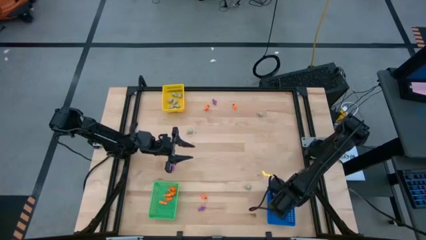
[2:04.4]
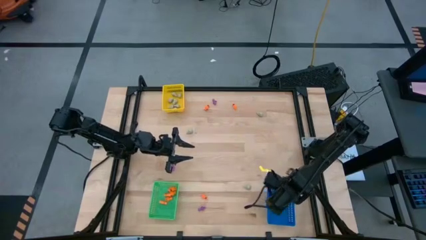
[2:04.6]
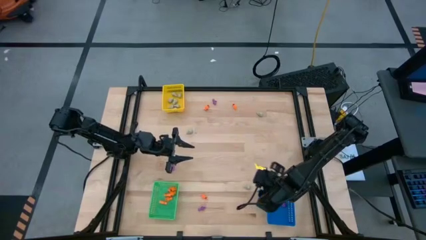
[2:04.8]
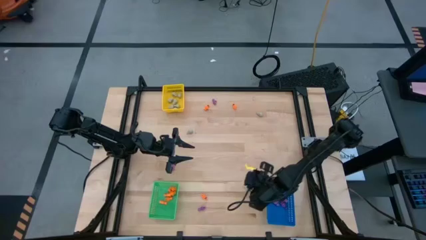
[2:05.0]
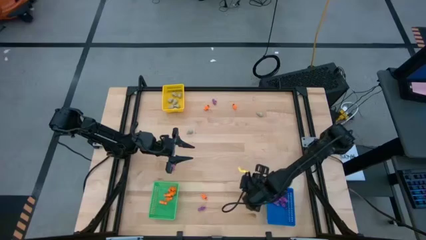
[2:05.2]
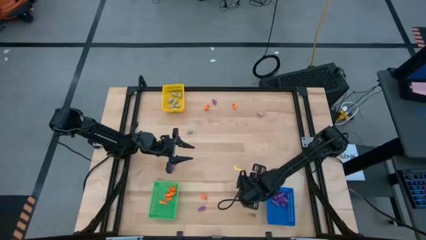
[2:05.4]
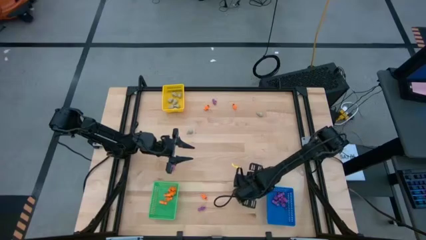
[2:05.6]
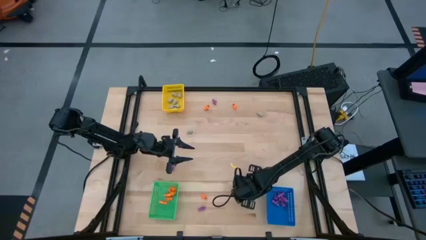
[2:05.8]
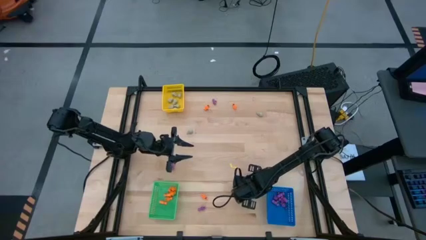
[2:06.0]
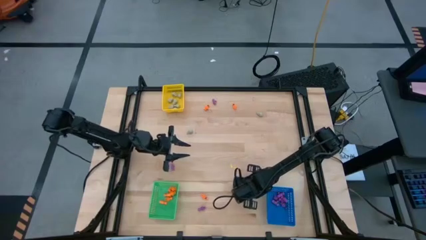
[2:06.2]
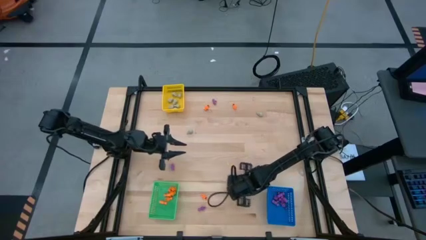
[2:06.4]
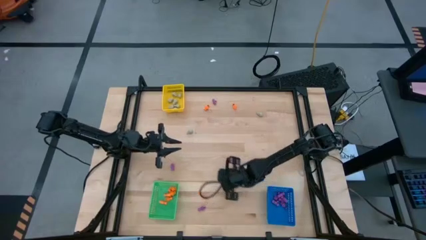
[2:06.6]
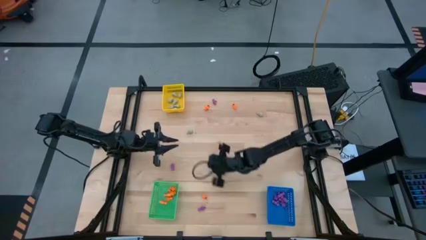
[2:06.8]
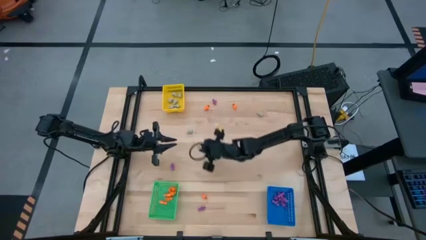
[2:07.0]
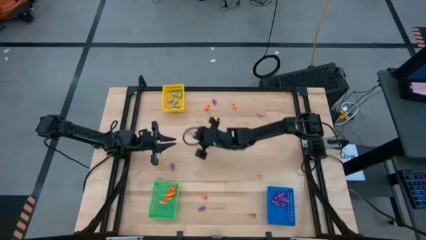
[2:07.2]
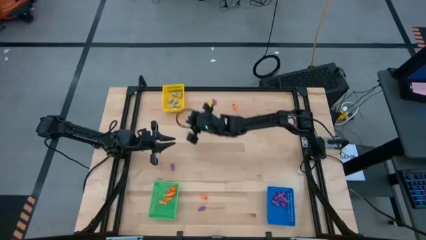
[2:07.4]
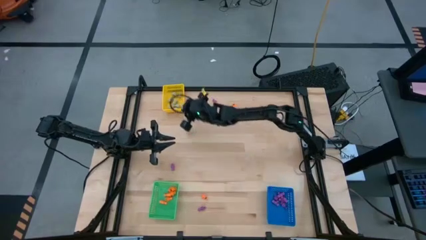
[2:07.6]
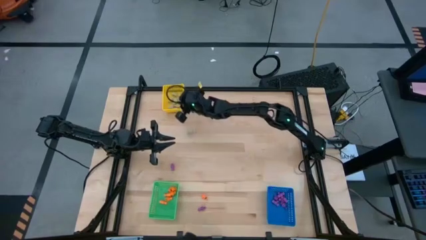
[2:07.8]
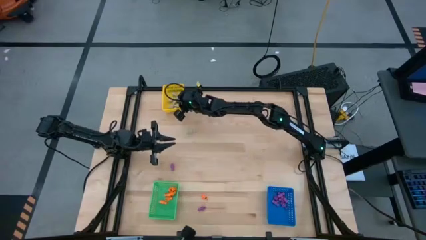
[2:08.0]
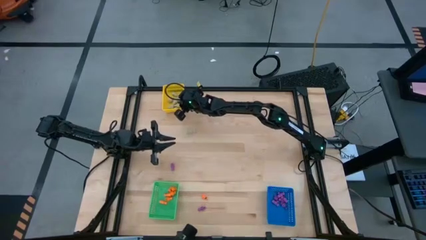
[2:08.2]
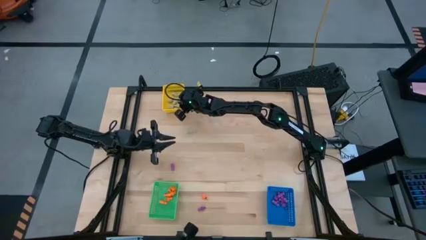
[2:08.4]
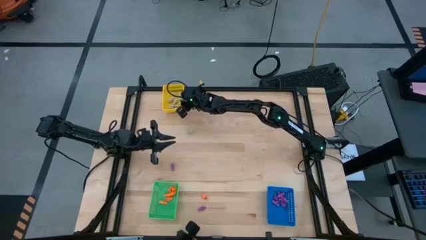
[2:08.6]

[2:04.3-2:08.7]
Task: Sort Halloween decoration
Put the gray skull toy into the yellow bin

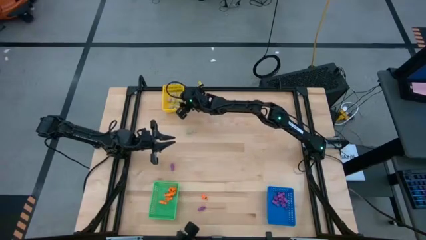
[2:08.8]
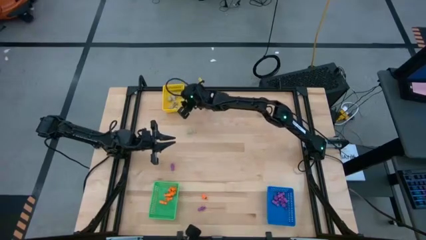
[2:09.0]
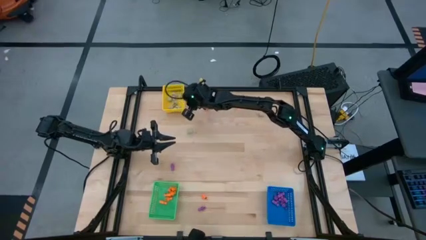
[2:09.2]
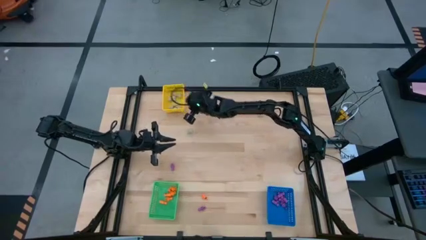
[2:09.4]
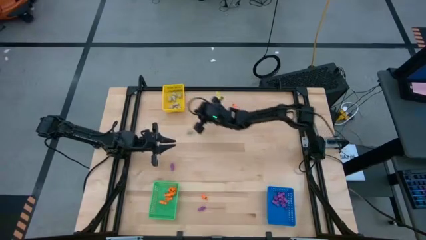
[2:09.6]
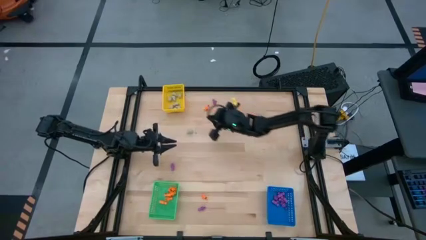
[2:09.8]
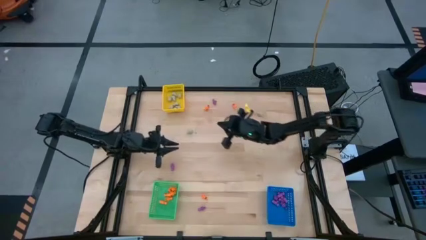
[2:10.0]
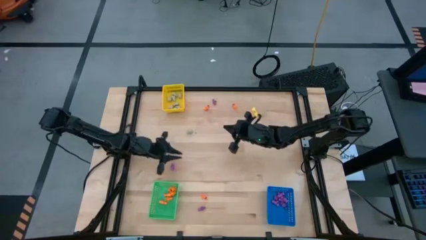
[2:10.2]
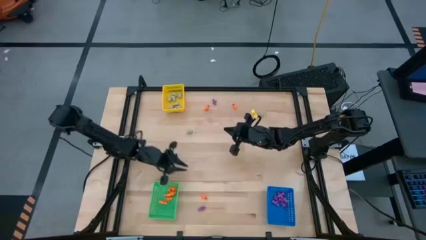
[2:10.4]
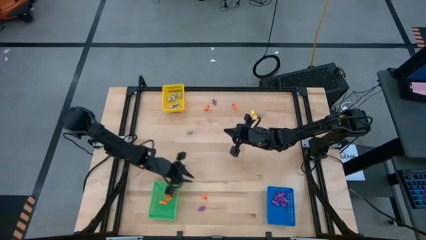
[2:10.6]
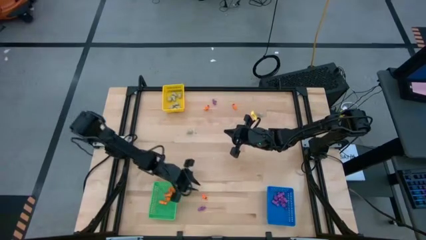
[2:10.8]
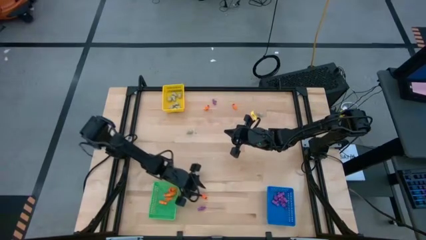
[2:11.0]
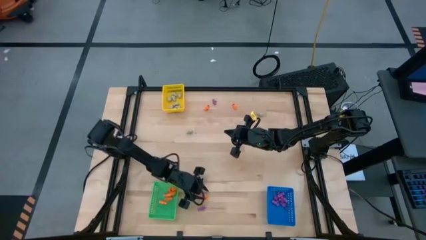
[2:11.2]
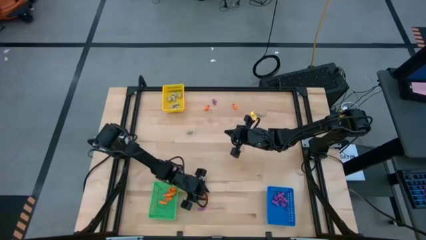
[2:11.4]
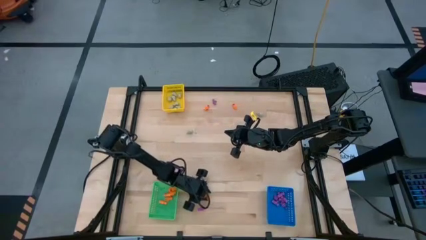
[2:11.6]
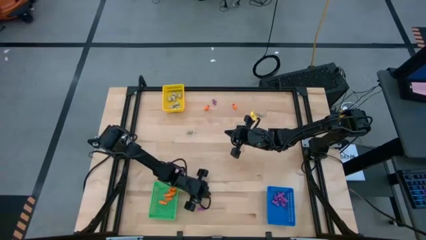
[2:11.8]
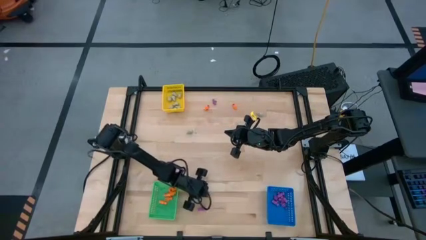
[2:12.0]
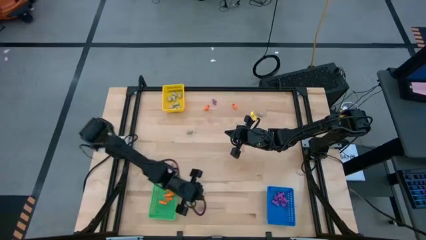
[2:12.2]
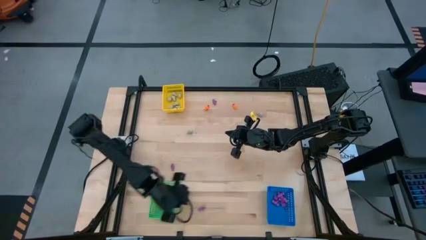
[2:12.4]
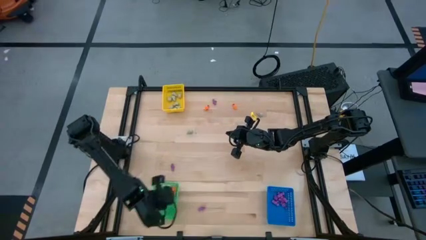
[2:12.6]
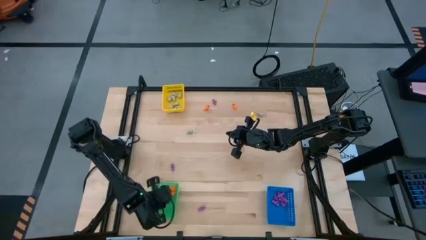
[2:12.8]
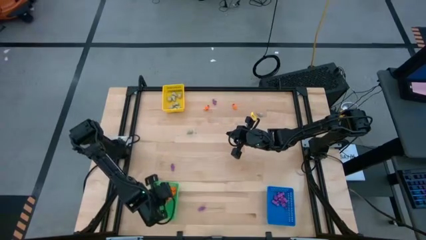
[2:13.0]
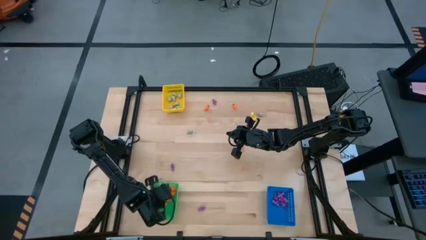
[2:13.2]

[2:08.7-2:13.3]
Put the orange skeleton toy into the green bin

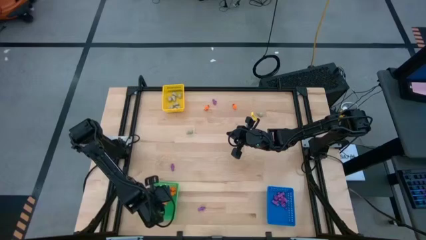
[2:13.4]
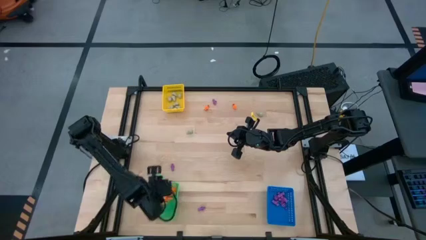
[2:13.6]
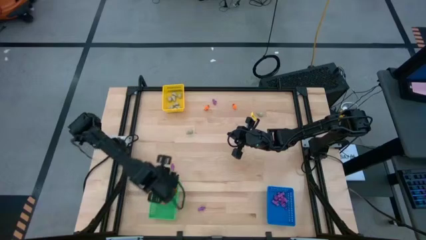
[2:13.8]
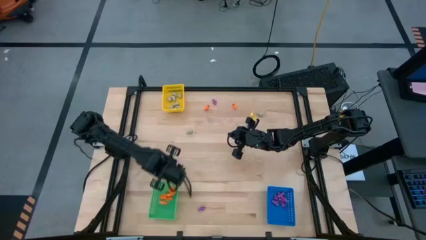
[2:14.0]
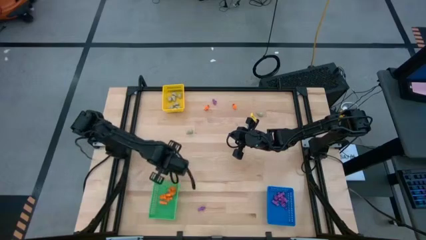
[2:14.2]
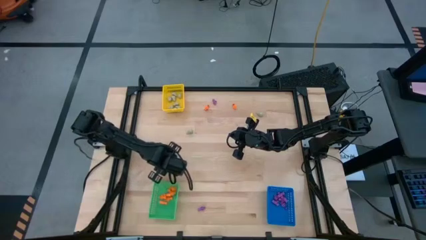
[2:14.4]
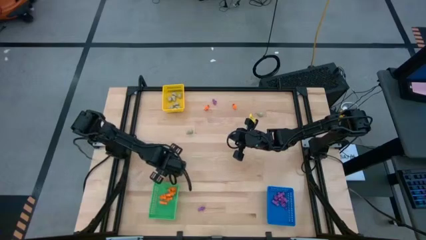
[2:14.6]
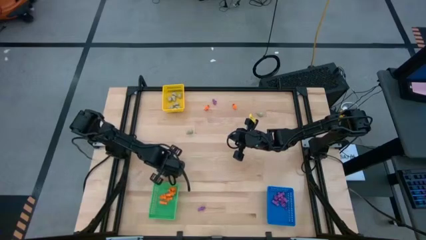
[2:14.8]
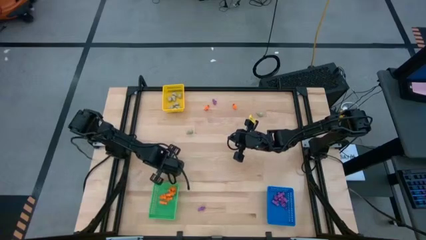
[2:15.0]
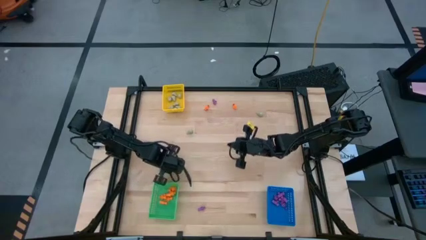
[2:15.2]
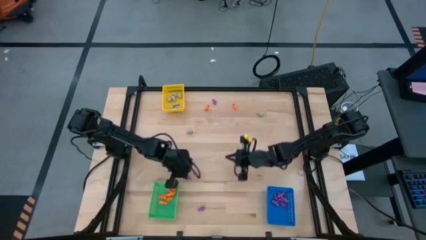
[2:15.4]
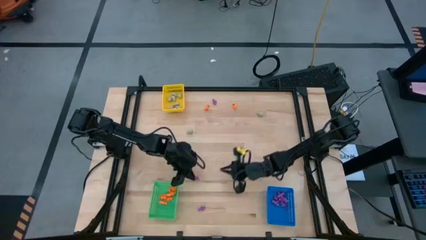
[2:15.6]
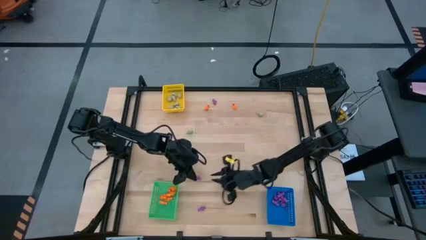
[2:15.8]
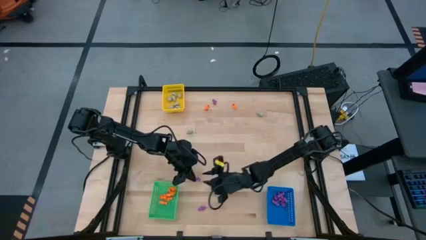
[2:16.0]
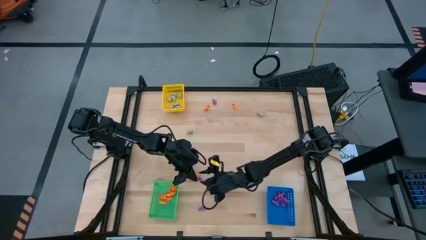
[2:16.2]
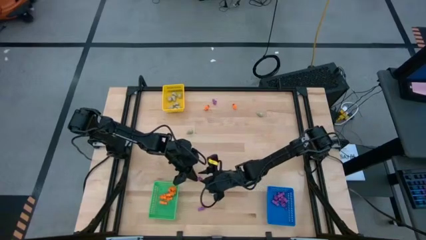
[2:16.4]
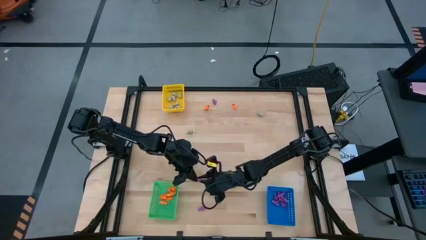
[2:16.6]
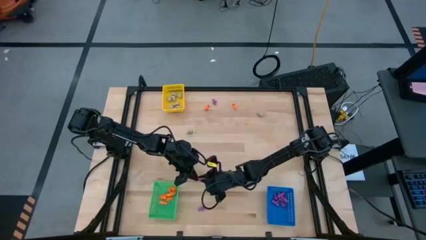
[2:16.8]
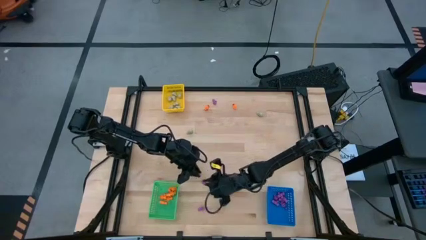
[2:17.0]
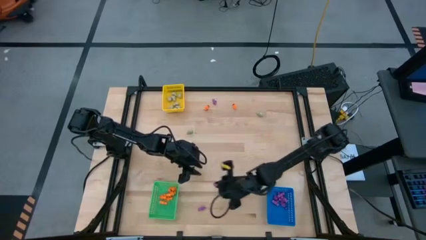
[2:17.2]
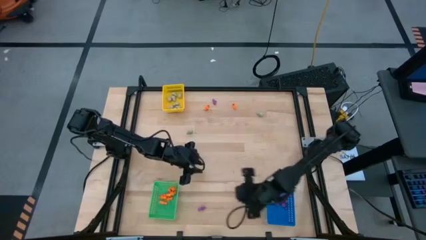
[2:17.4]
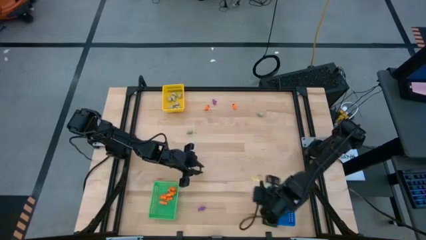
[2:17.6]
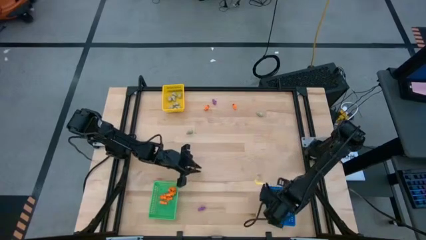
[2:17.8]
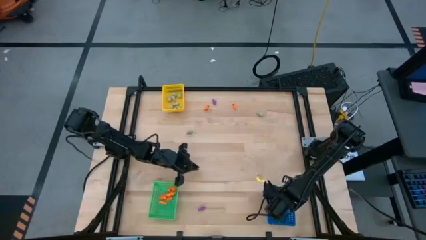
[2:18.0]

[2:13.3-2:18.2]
Put the purple skeleton toy into the blue bin

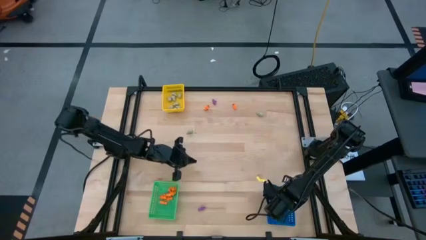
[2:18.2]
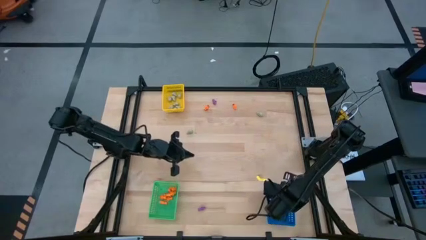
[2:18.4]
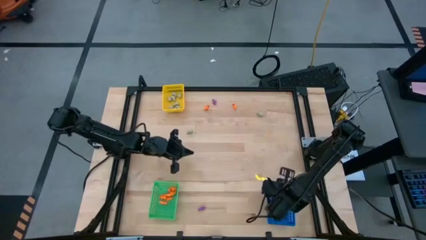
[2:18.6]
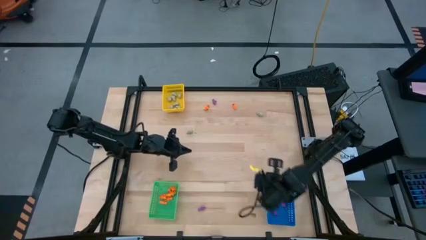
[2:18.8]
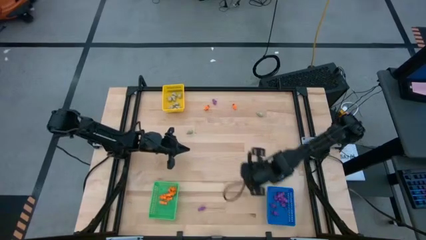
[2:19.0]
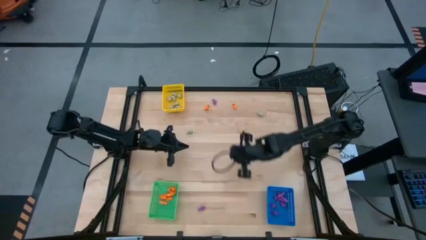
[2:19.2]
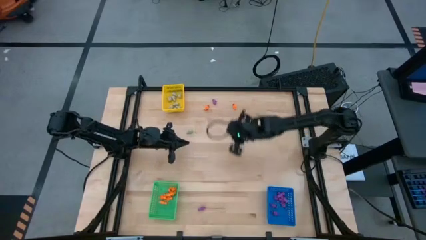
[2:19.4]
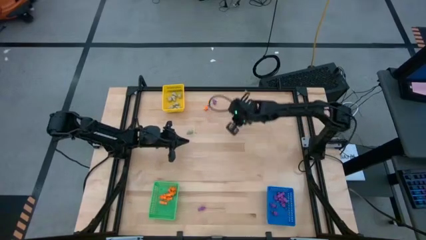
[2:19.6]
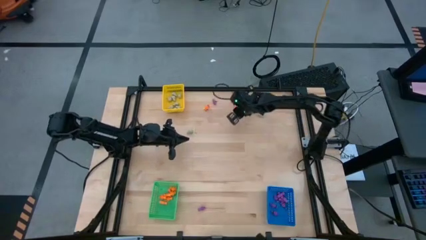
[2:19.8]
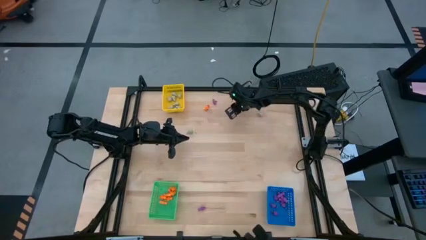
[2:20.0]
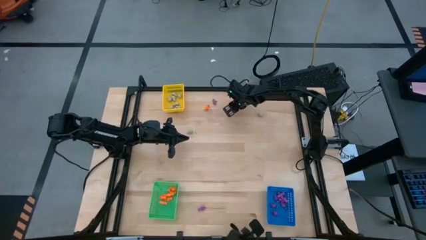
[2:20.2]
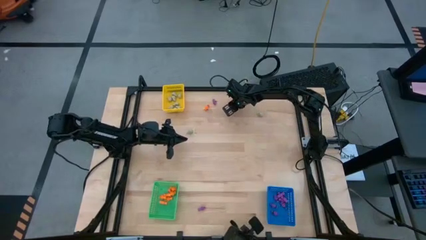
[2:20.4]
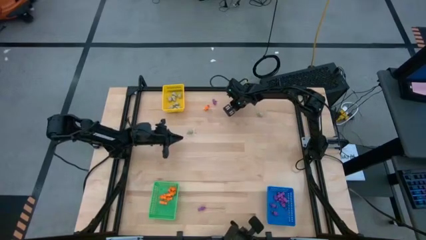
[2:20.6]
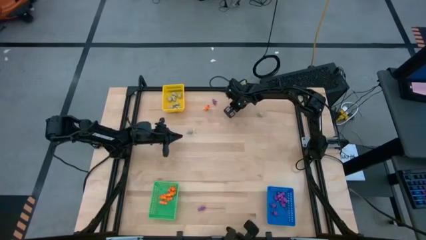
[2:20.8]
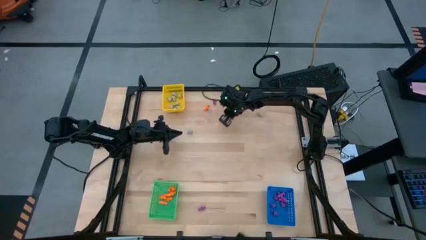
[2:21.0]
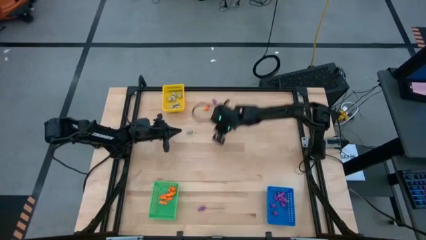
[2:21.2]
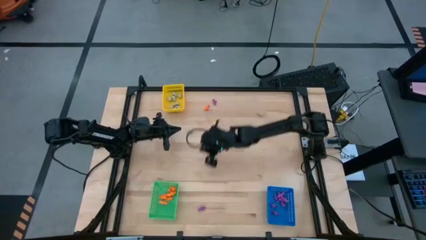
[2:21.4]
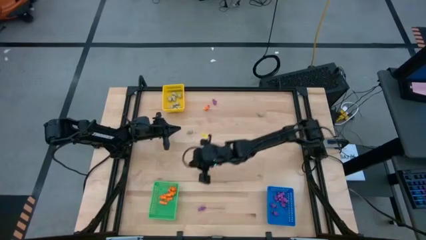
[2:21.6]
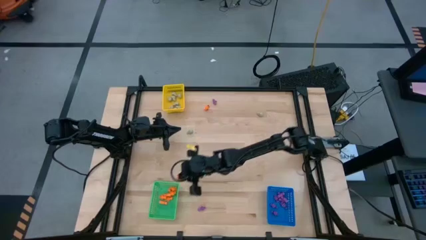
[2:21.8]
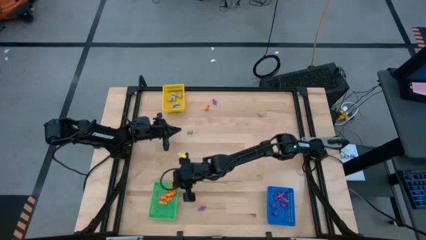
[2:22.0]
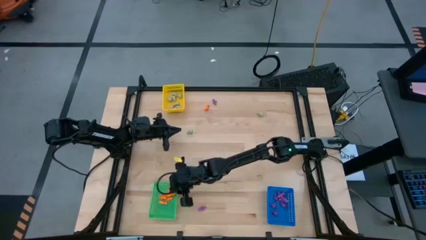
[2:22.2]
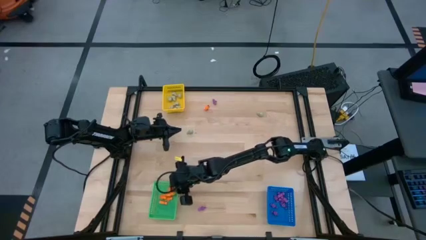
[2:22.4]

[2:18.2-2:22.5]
Put the orange skeleton toy into the green bin
